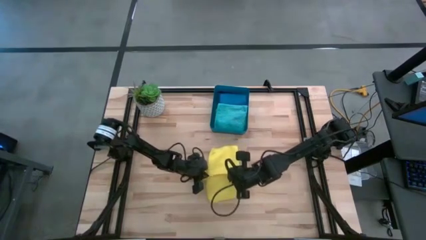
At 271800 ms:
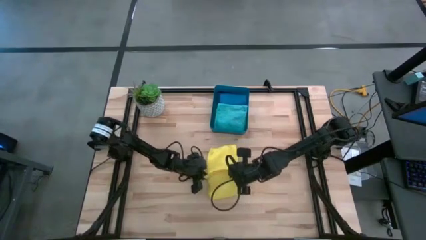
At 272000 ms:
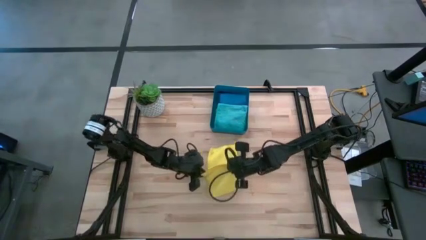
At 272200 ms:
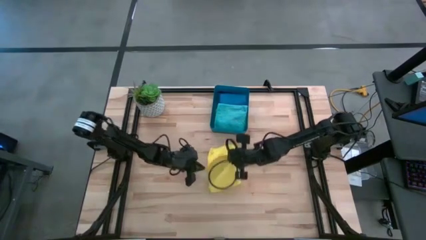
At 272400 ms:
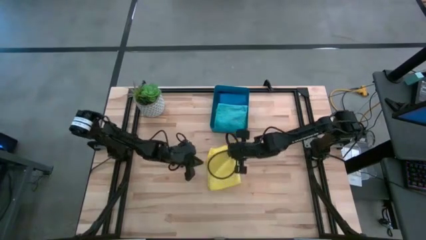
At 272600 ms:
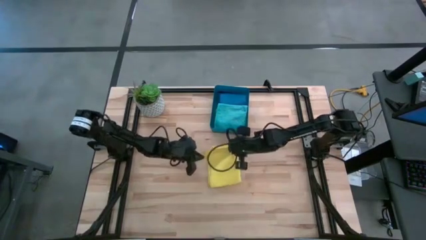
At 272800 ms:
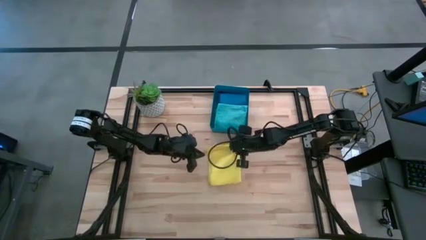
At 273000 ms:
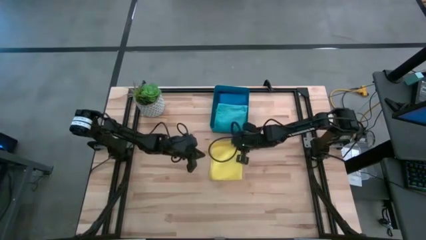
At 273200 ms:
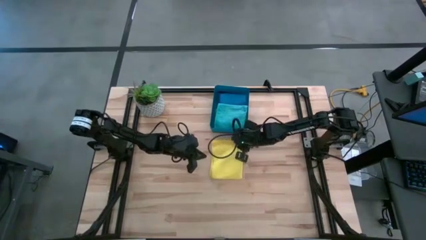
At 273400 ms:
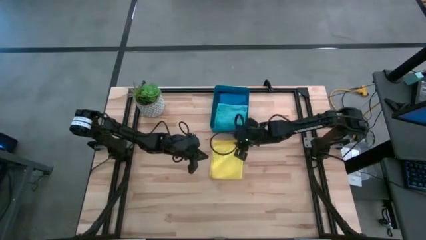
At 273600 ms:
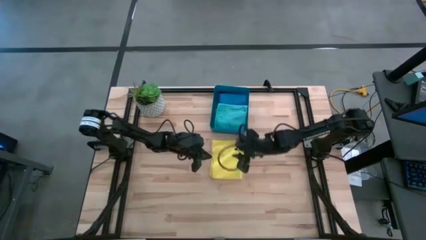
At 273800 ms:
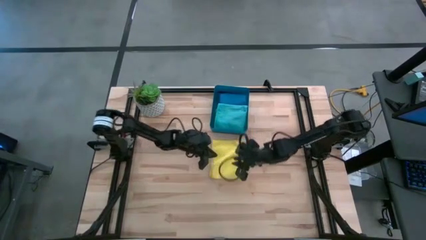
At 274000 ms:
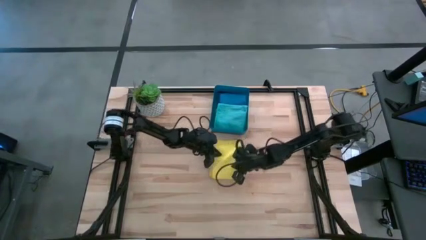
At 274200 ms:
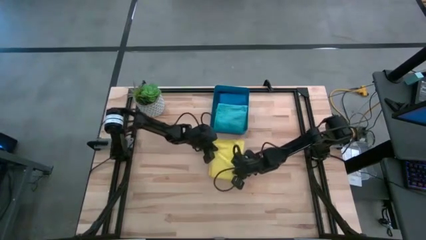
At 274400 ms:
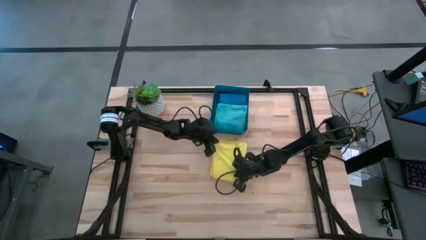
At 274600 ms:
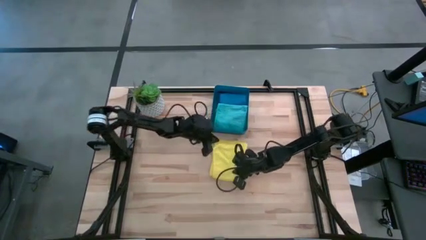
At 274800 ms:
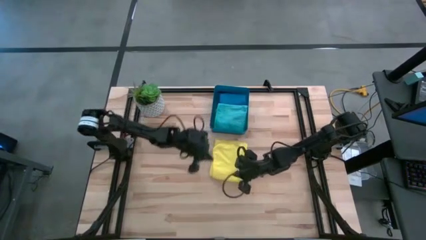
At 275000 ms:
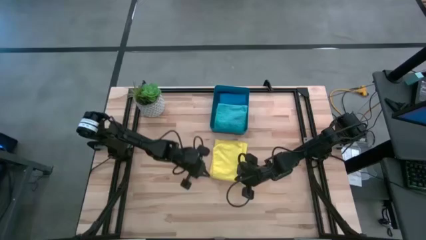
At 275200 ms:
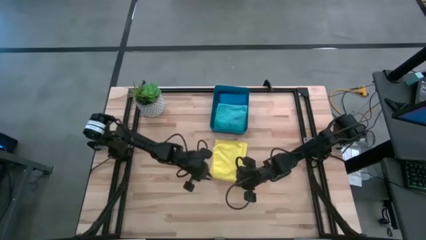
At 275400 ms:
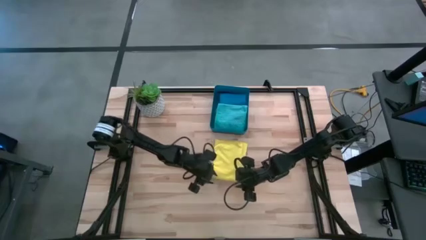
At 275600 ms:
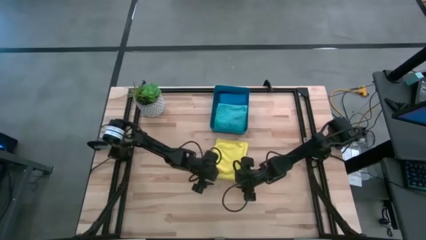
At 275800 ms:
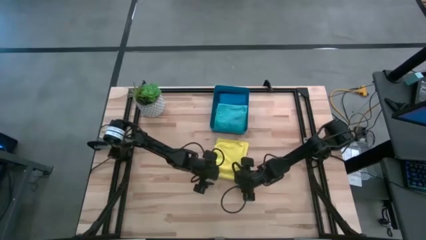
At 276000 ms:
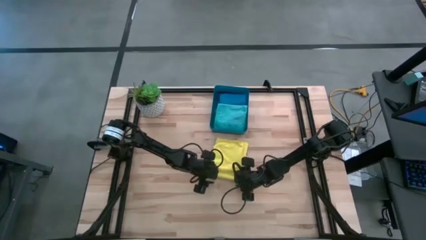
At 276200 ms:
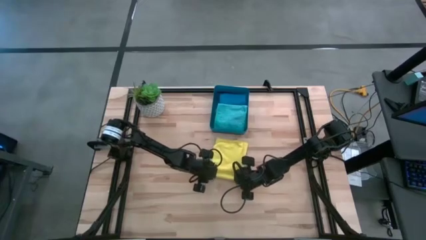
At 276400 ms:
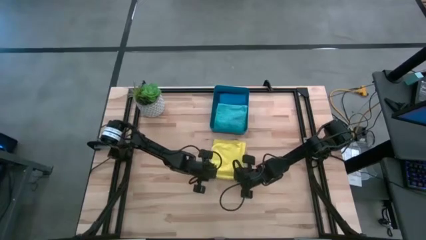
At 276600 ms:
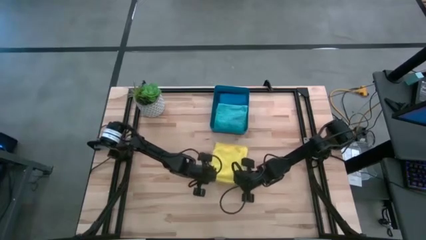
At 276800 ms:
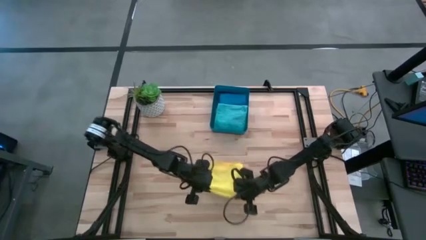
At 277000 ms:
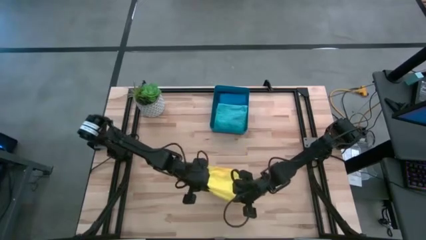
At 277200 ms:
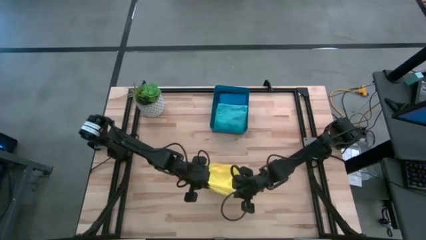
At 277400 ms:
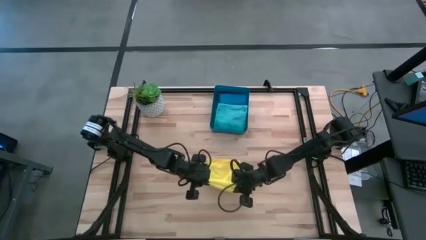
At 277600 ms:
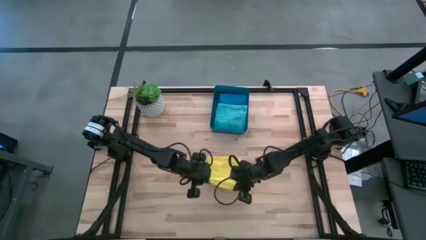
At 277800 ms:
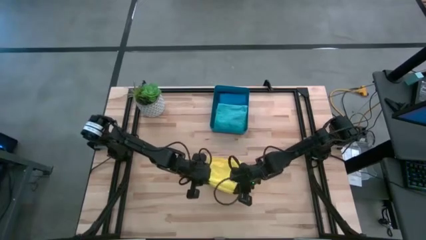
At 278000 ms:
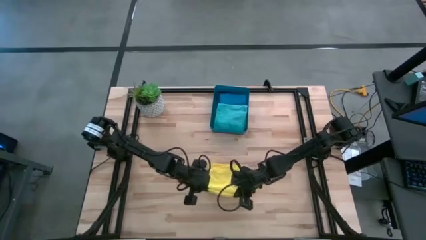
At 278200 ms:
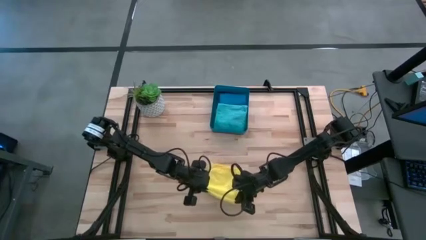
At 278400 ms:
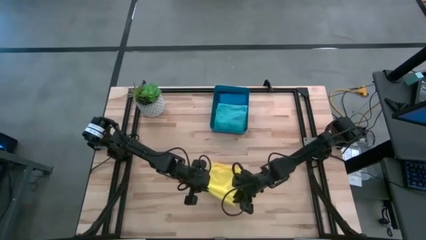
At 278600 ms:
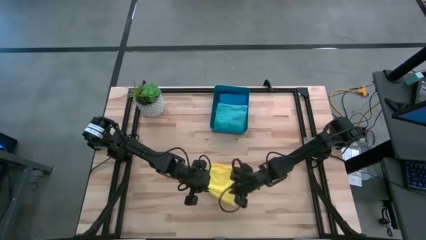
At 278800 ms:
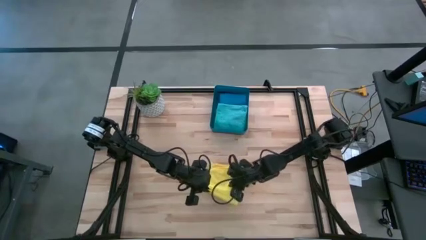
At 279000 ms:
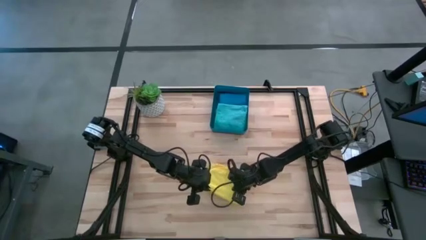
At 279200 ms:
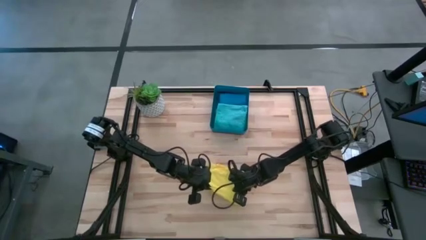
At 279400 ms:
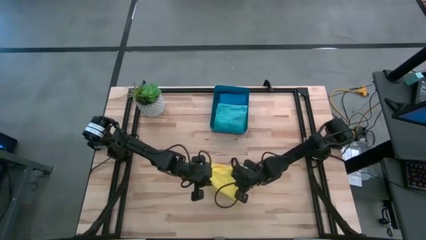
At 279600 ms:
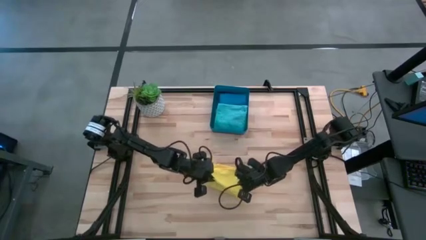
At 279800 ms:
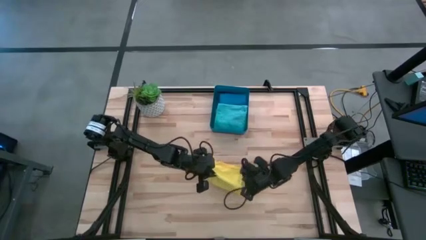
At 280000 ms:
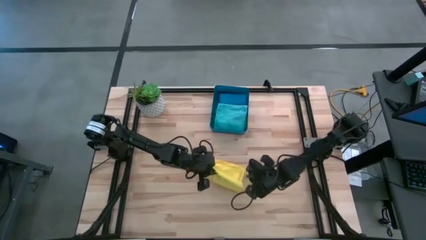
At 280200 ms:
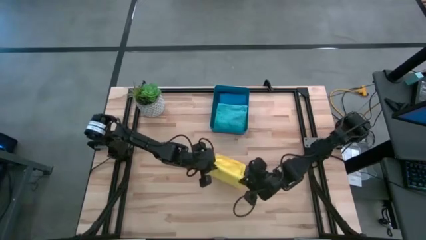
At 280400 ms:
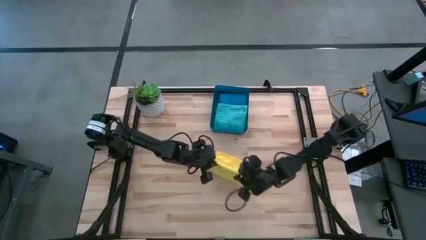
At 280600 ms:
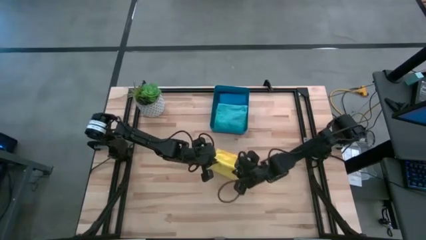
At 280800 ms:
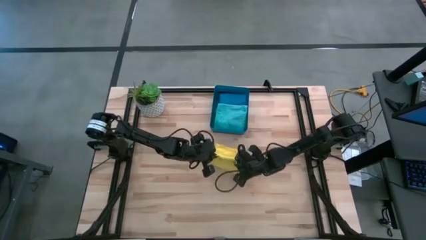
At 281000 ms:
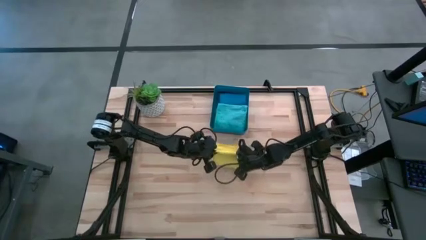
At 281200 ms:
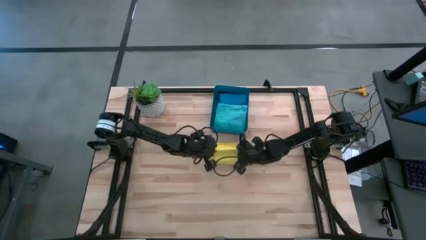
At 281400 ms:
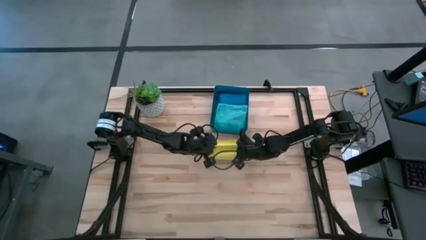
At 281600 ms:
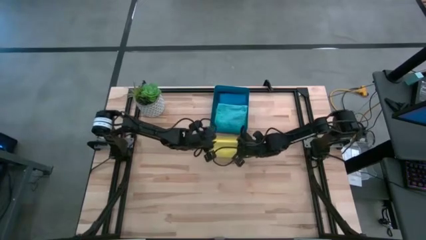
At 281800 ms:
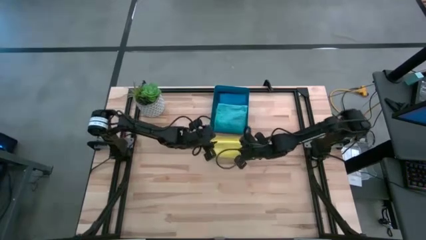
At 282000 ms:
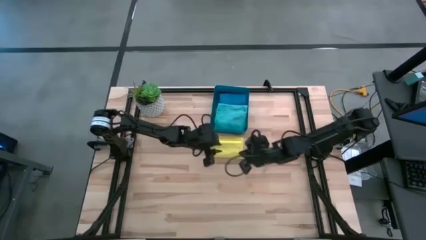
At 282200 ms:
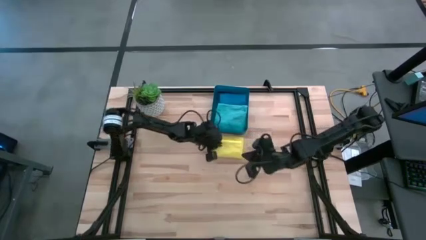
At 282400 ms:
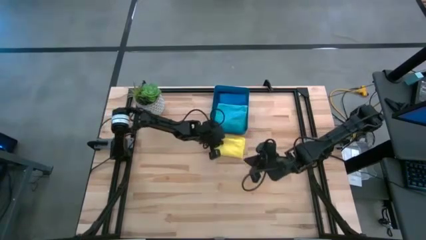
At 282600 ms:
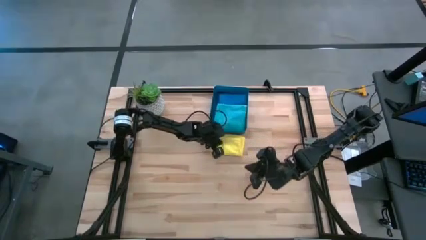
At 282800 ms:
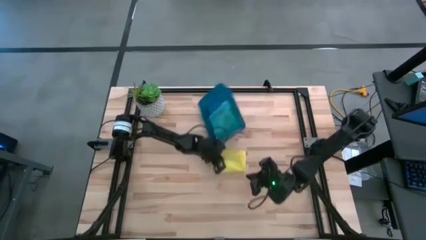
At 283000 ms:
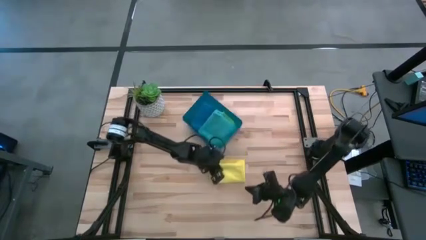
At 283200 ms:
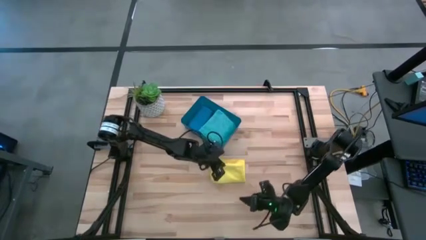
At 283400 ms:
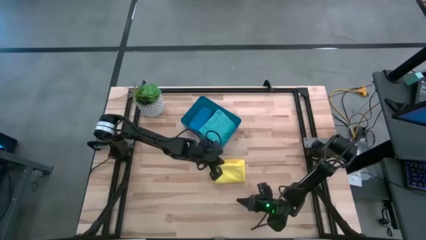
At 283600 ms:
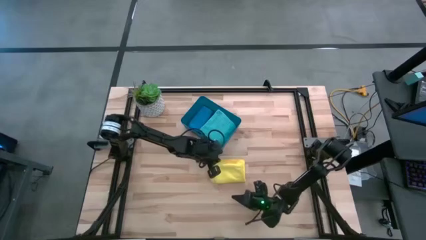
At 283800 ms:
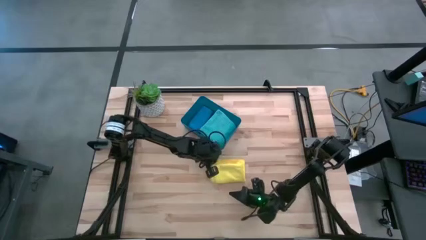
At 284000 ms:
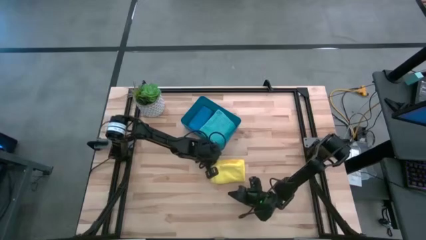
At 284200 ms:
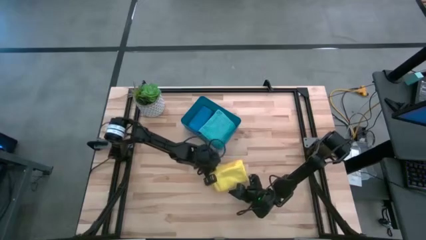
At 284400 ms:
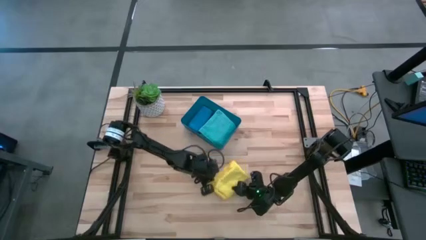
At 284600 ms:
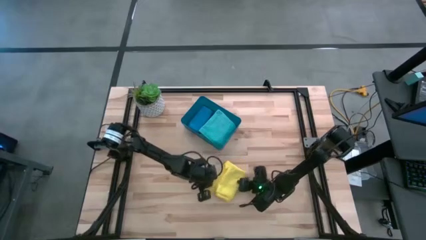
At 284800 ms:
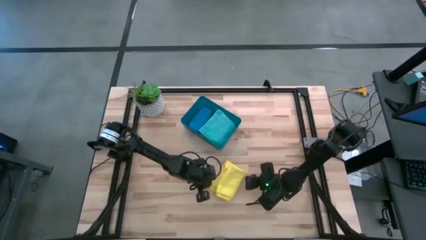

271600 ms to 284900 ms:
Task: Fold microfiber towels
Fold the yellow microfiber cloth

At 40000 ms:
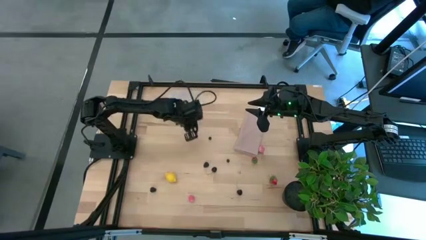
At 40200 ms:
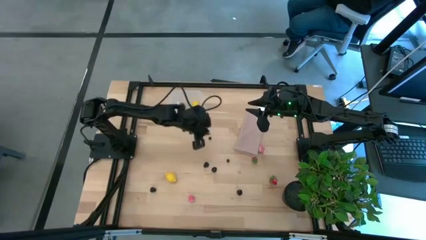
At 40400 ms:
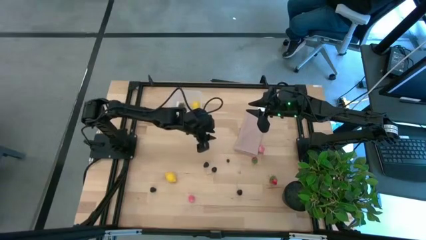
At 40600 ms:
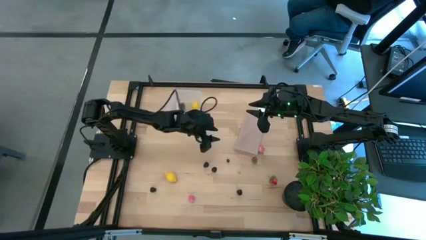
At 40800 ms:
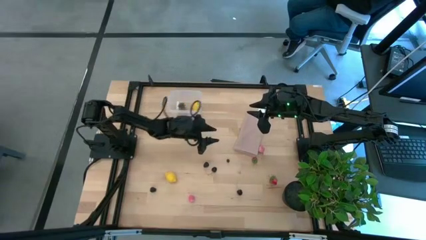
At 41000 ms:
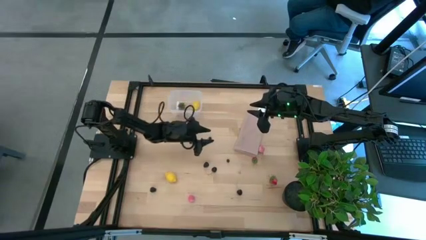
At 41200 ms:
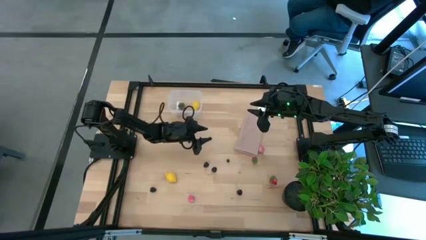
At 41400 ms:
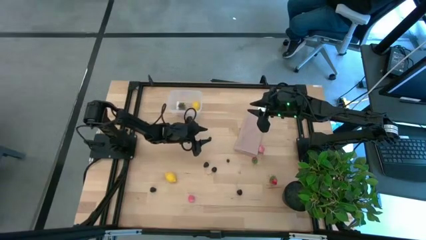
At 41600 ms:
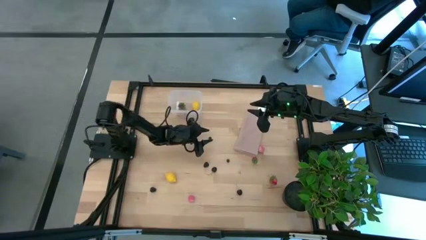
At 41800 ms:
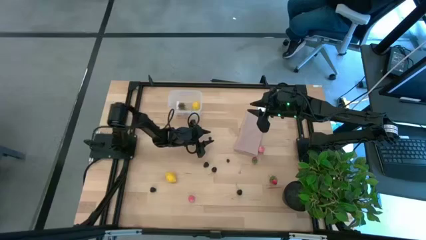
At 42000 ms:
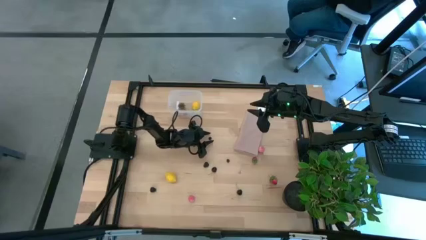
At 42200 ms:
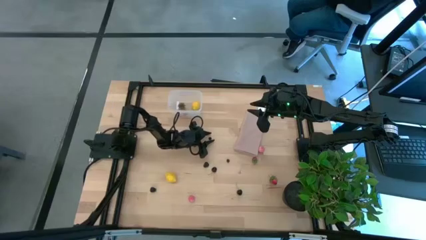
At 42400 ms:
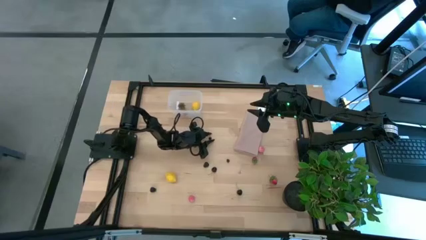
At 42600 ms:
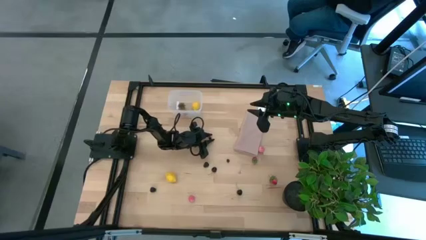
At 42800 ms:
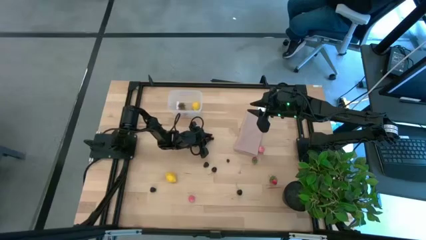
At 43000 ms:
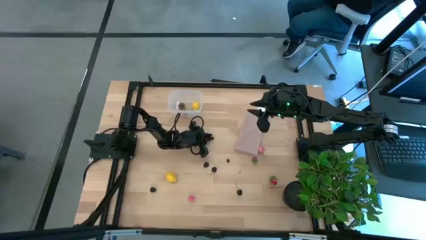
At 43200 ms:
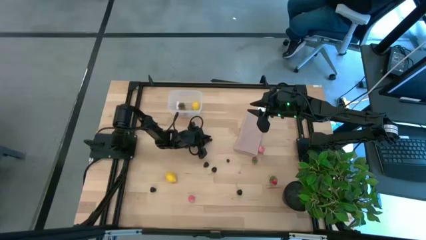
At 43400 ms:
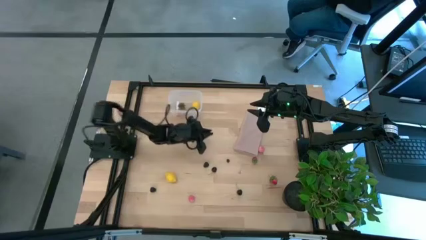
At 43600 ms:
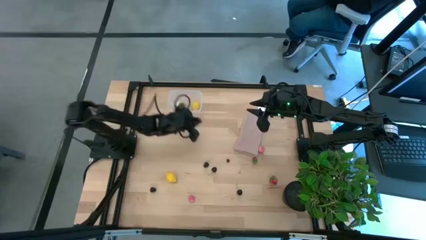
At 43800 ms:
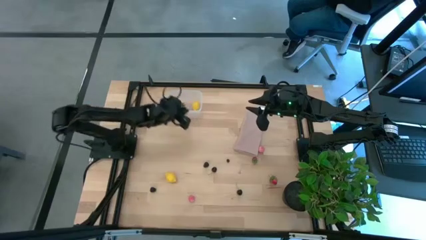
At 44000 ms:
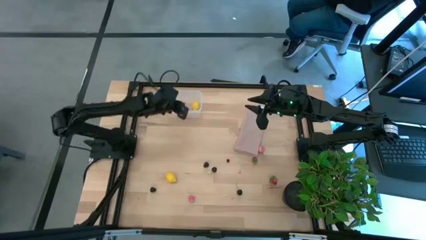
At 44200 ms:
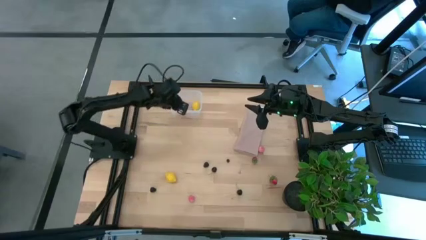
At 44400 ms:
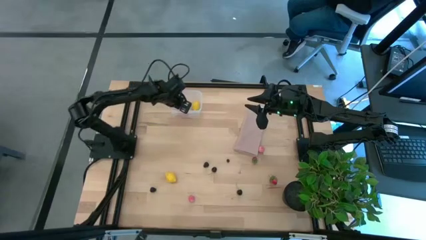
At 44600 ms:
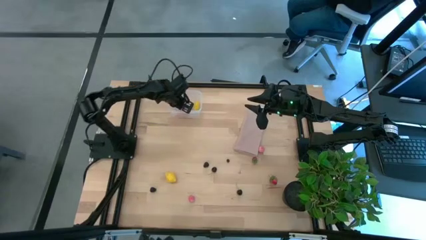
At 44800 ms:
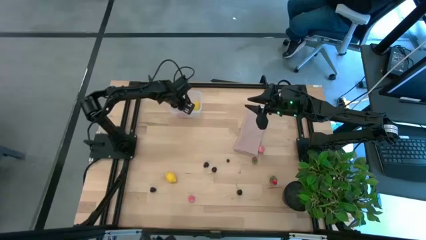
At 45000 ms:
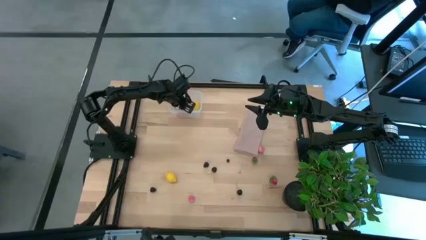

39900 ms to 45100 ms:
Task: Pick and placing Produce into tupperware
Put the blueberry into the transparent bin
